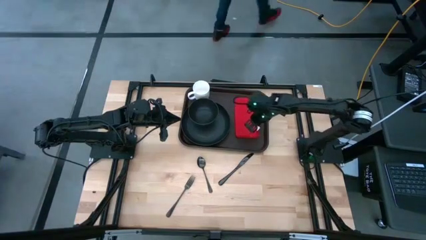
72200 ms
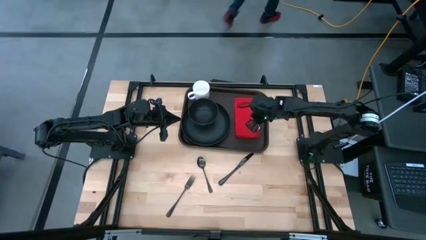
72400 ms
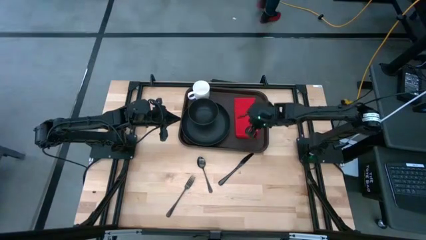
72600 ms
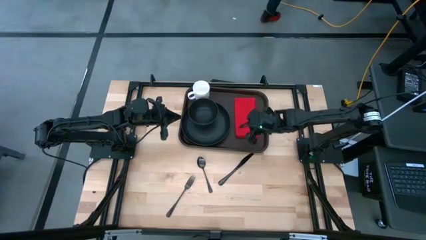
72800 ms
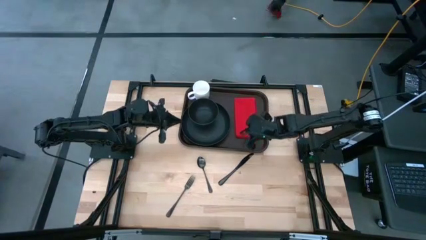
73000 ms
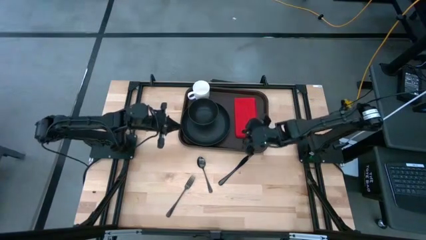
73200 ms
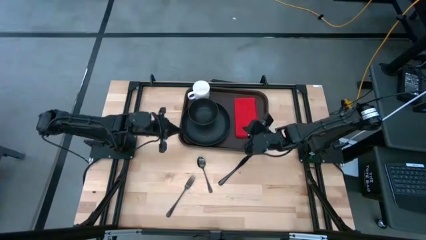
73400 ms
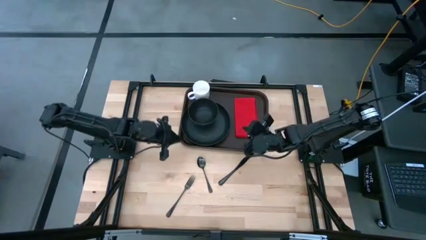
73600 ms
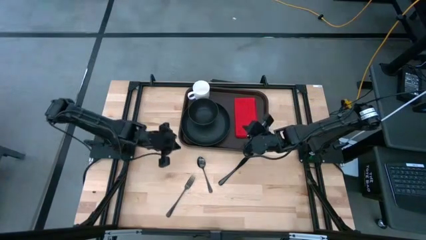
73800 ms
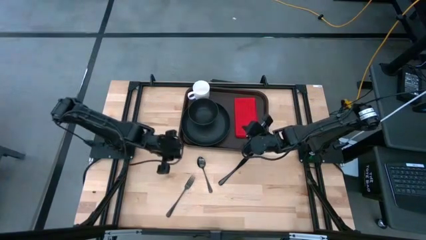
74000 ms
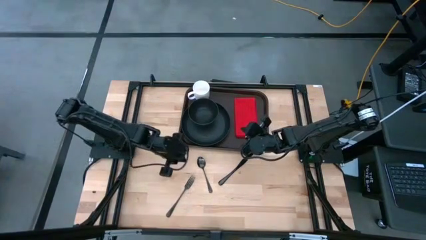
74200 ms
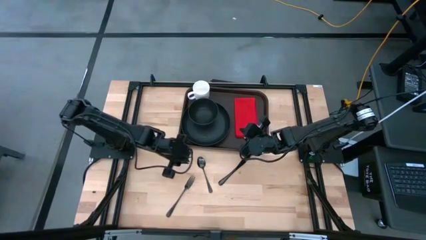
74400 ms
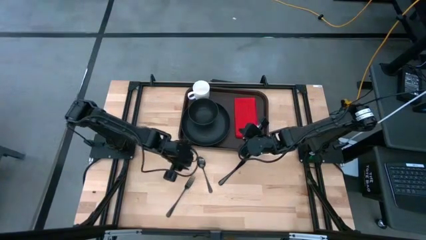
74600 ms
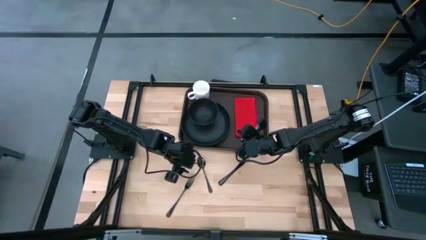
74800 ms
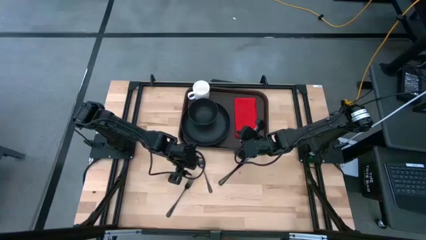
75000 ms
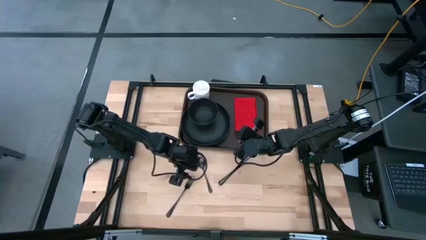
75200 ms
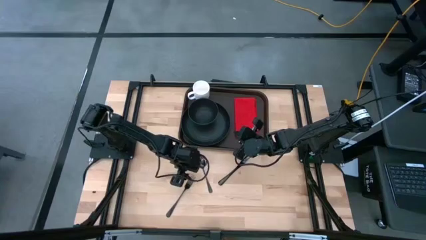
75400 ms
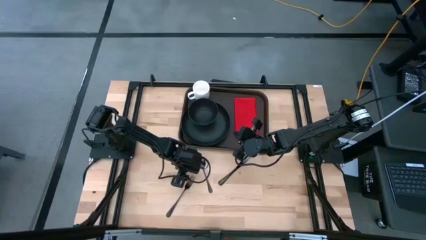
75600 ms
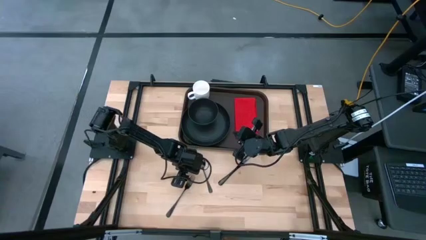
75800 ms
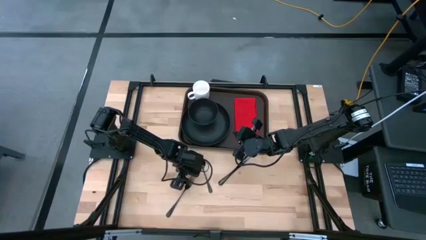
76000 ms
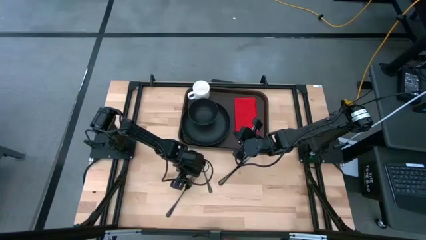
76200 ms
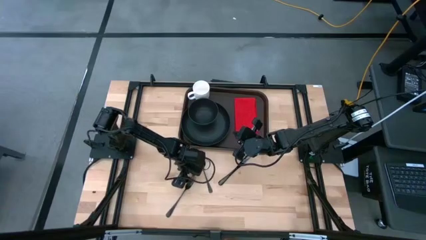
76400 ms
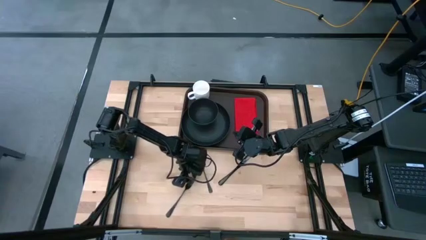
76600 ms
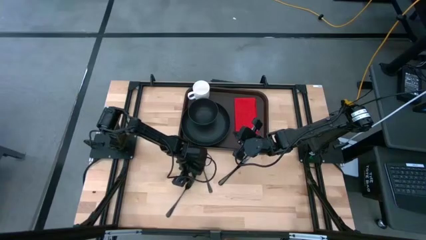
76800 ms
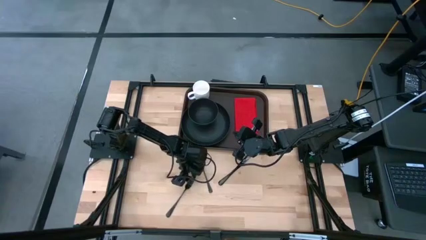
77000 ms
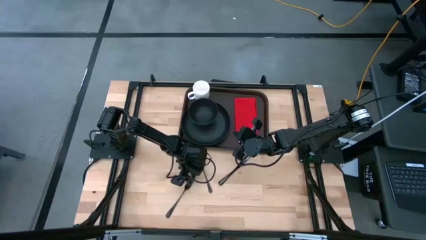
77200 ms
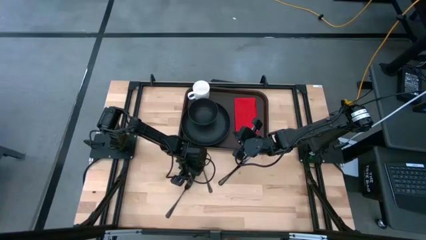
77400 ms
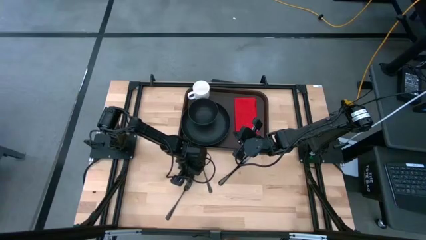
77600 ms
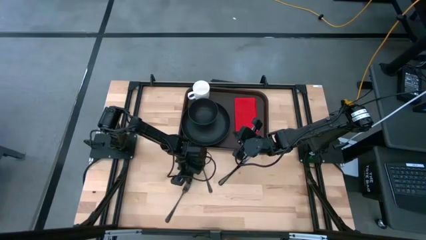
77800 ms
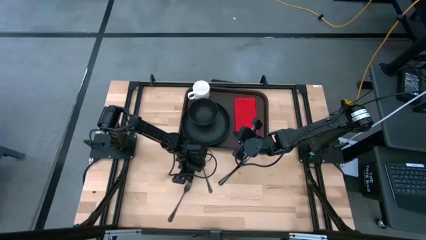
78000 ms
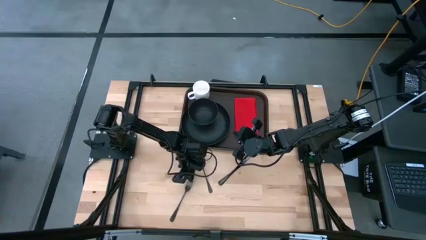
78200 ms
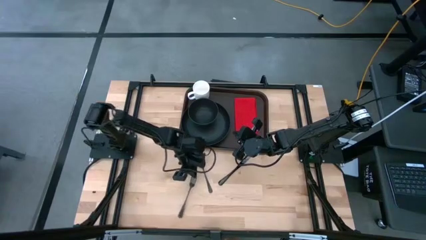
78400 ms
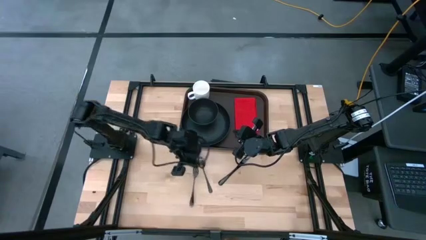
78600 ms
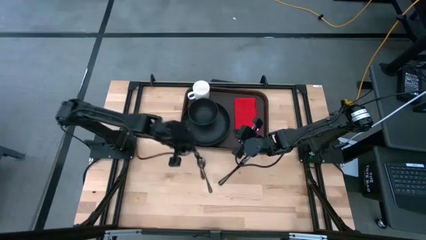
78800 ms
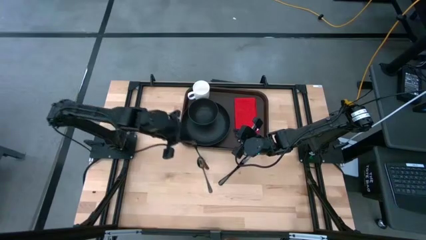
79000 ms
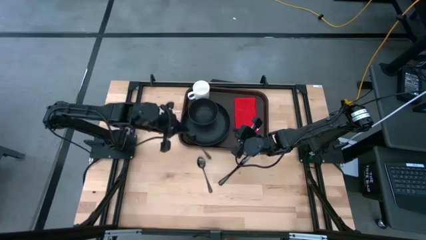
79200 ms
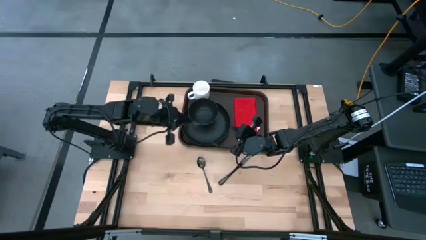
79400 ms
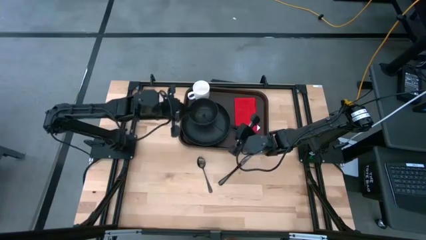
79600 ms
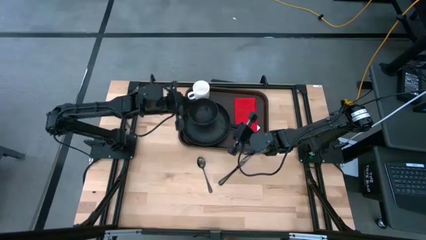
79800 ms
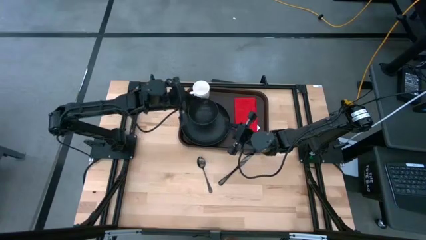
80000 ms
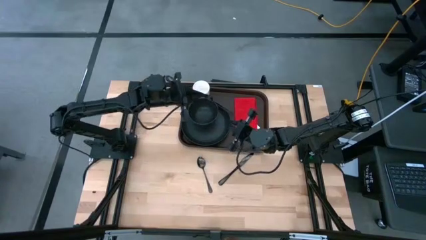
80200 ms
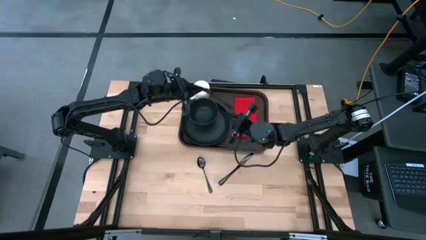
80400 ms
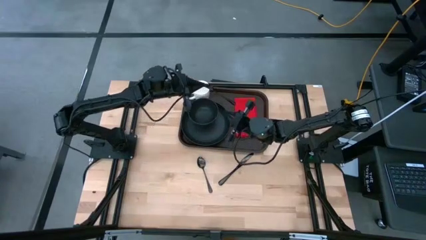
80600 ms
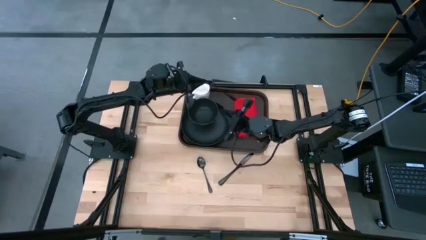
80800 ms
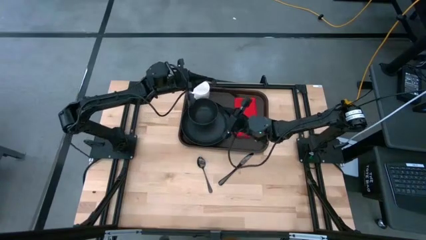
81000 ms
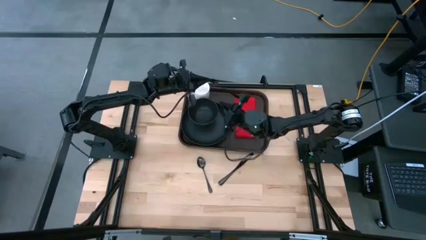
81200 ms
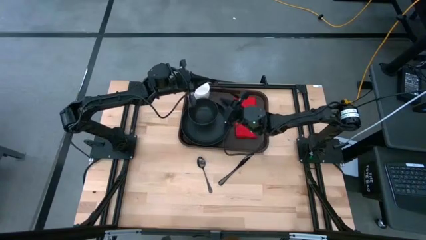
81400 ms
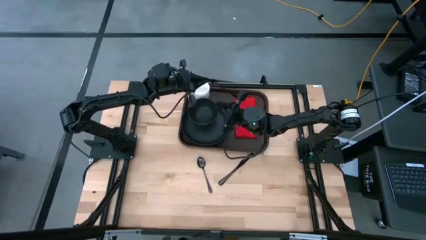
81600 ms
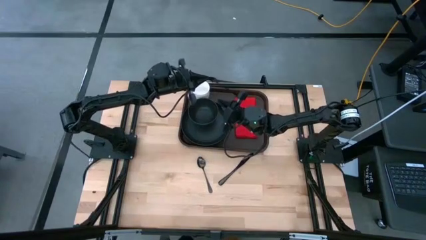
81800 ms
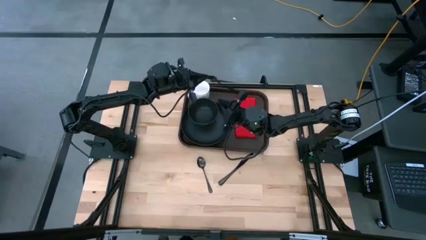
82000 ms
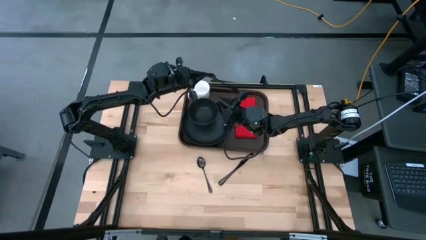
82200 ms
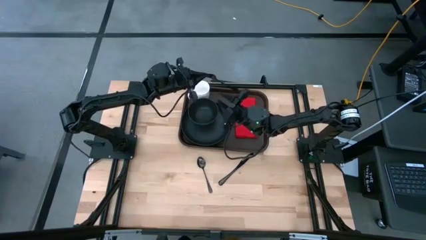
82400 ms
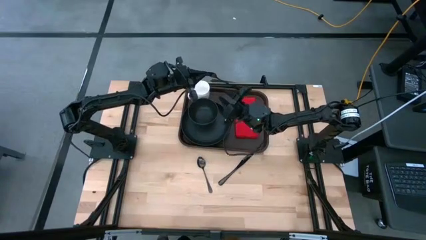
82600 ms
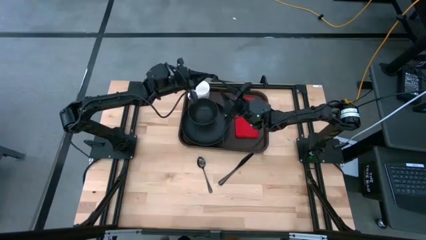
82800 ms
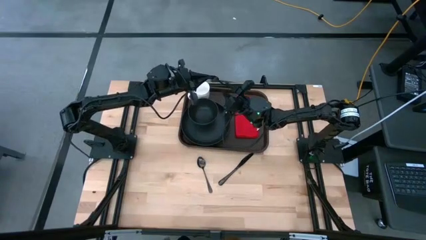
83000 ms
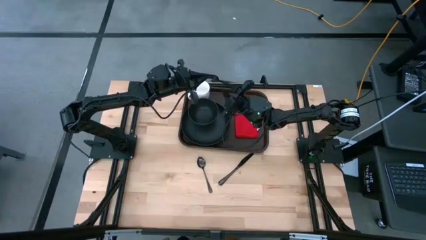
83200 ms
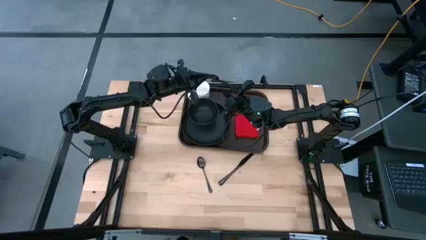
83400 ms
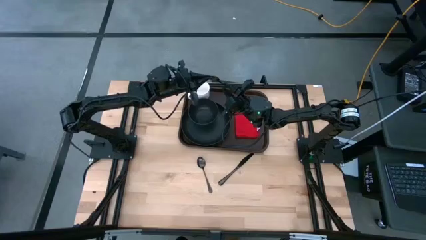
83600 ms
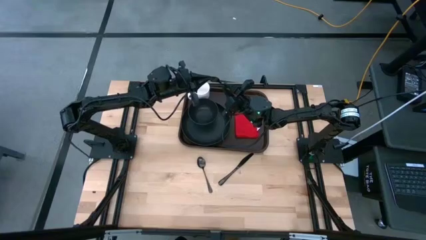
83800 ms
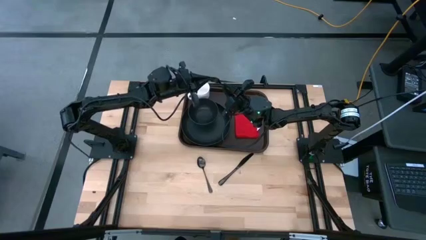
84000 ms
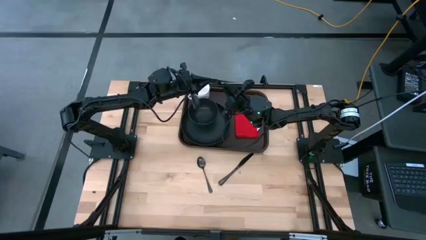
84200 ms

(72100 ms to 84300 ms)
Task: Set up tray
Put the black fork in the center of the red napkin
